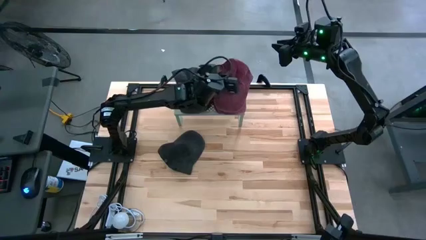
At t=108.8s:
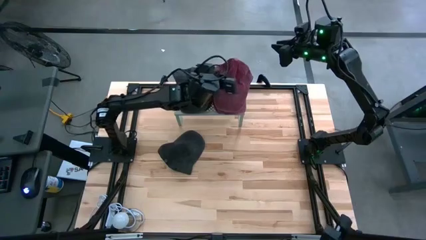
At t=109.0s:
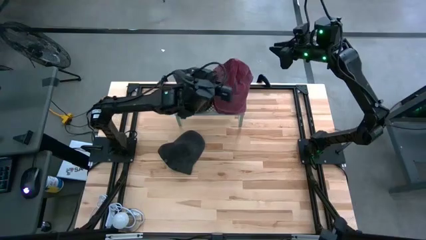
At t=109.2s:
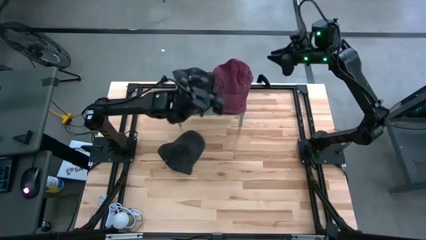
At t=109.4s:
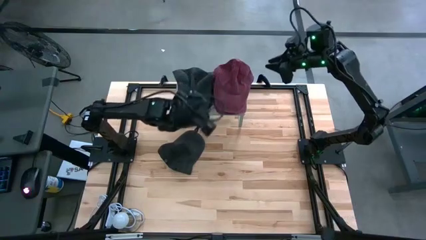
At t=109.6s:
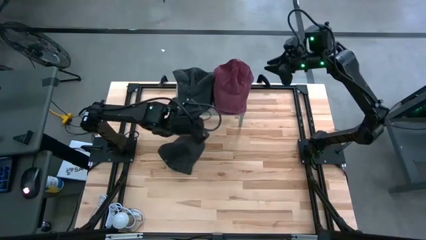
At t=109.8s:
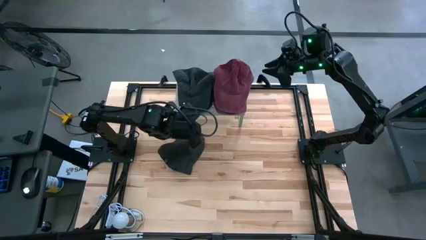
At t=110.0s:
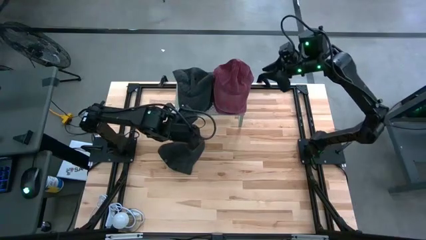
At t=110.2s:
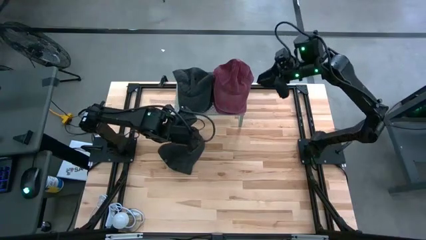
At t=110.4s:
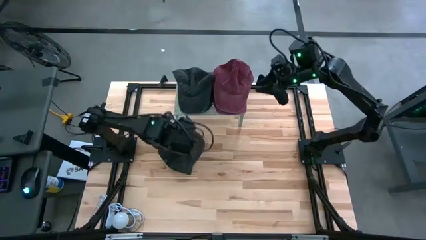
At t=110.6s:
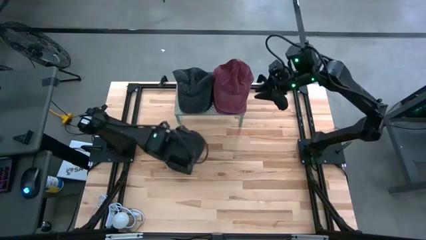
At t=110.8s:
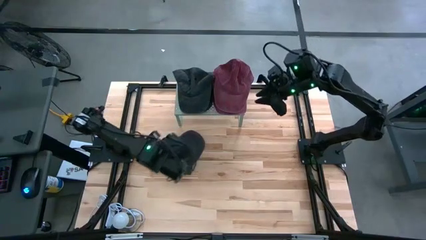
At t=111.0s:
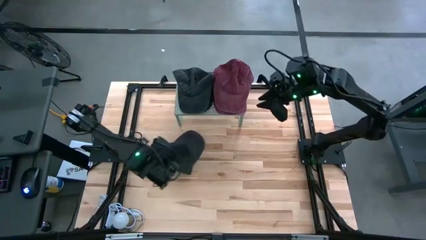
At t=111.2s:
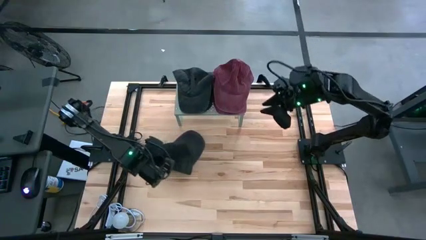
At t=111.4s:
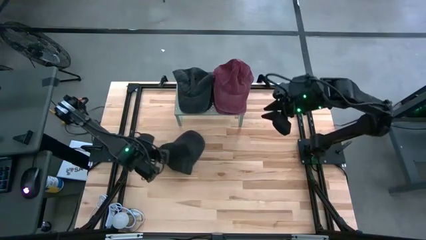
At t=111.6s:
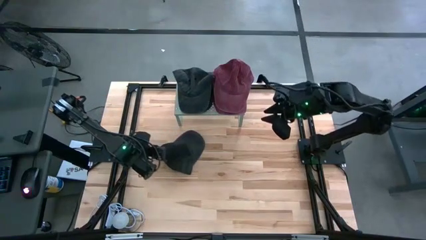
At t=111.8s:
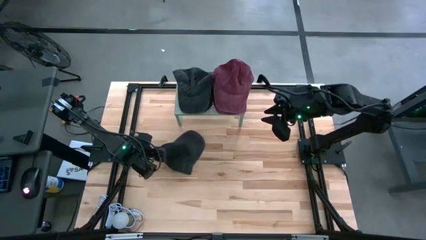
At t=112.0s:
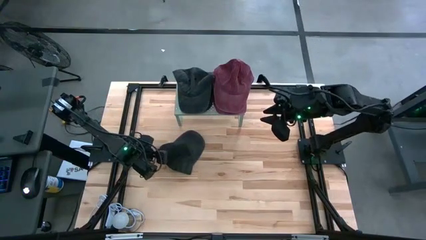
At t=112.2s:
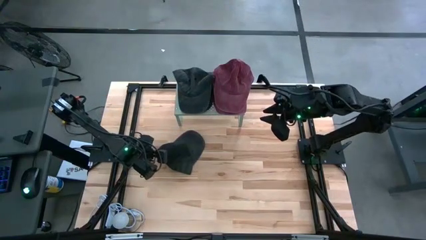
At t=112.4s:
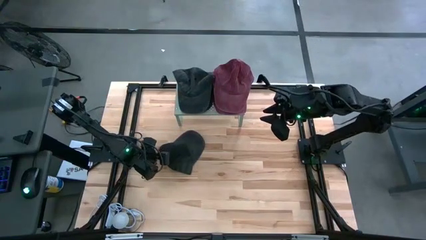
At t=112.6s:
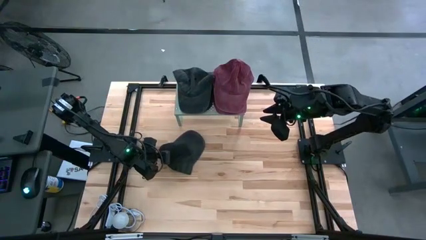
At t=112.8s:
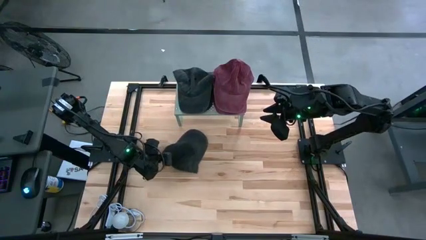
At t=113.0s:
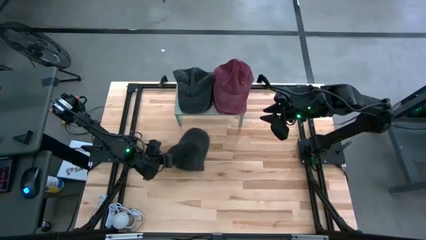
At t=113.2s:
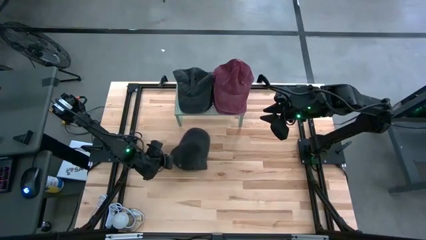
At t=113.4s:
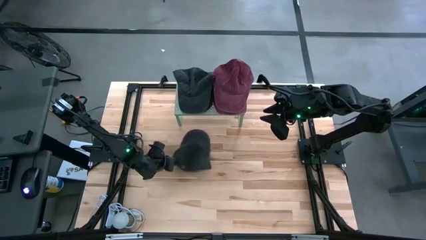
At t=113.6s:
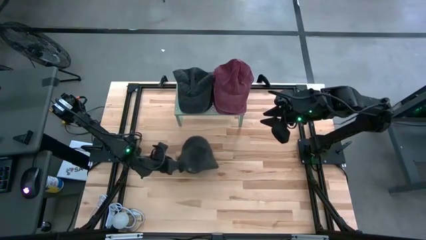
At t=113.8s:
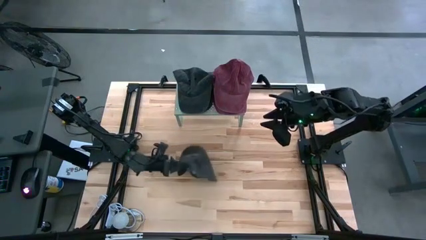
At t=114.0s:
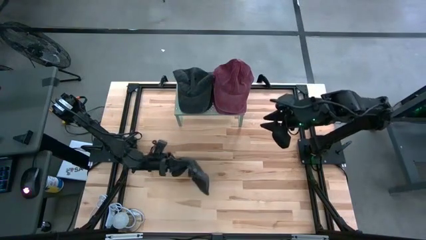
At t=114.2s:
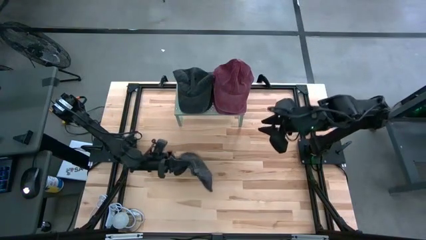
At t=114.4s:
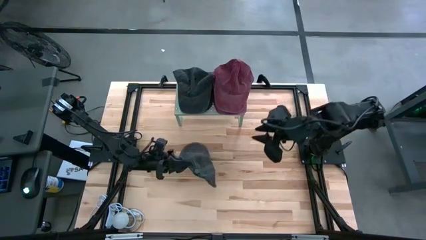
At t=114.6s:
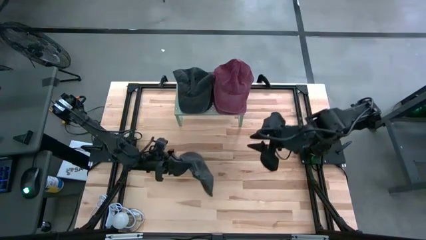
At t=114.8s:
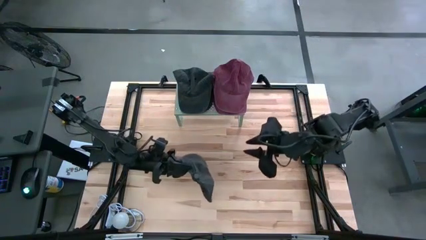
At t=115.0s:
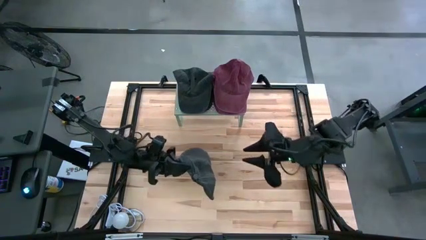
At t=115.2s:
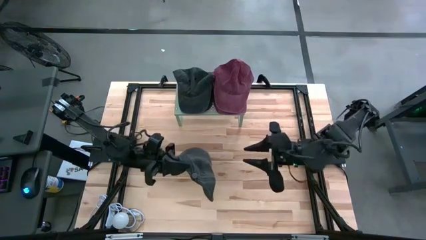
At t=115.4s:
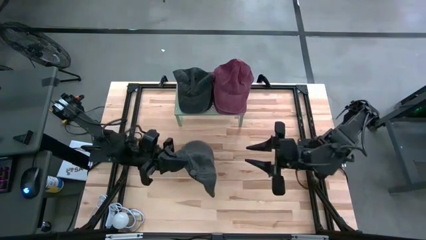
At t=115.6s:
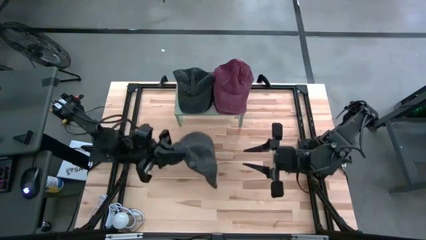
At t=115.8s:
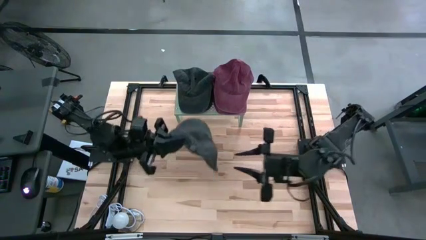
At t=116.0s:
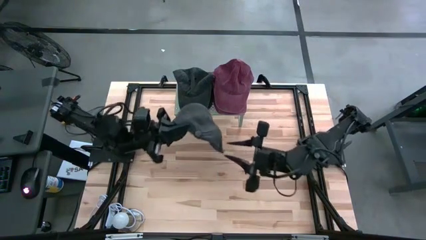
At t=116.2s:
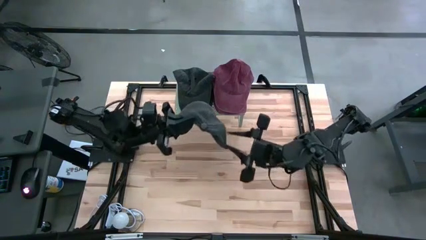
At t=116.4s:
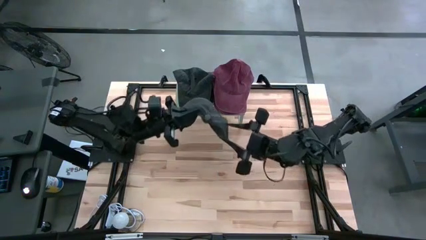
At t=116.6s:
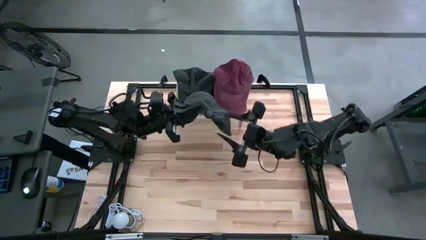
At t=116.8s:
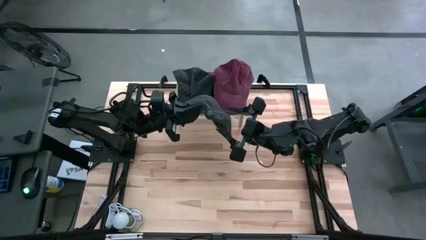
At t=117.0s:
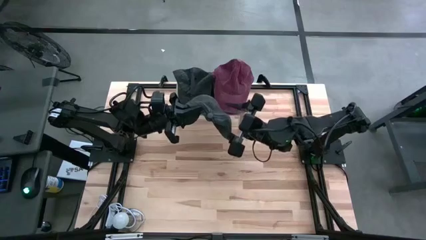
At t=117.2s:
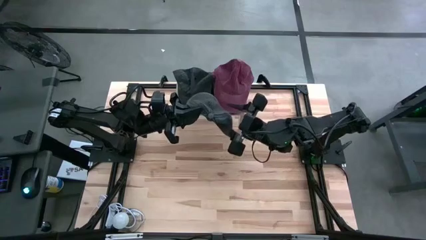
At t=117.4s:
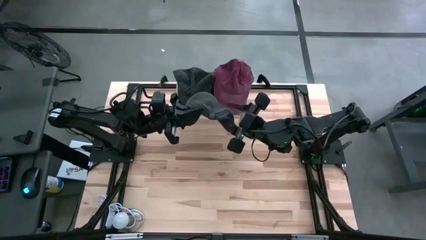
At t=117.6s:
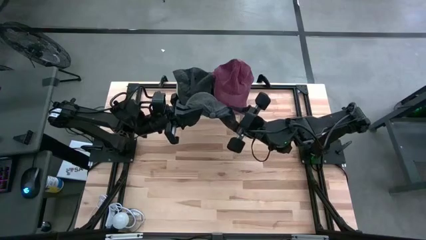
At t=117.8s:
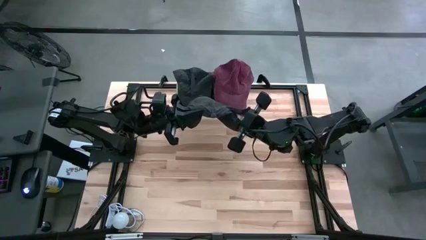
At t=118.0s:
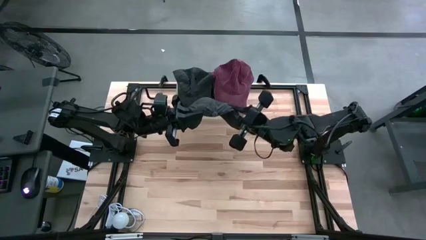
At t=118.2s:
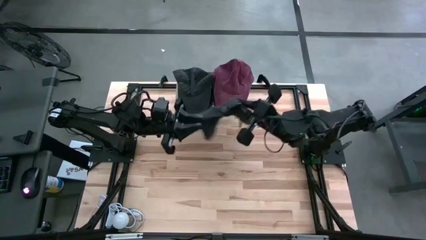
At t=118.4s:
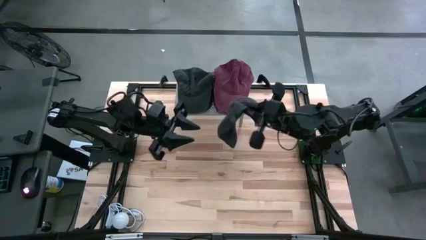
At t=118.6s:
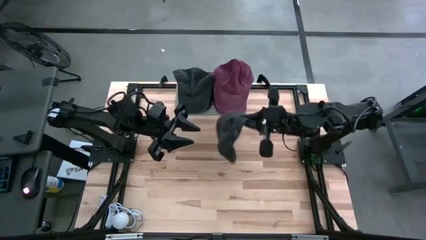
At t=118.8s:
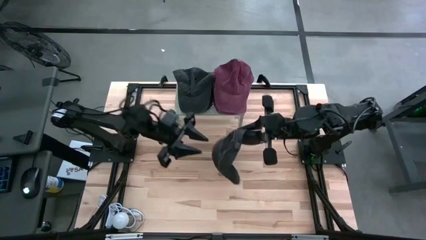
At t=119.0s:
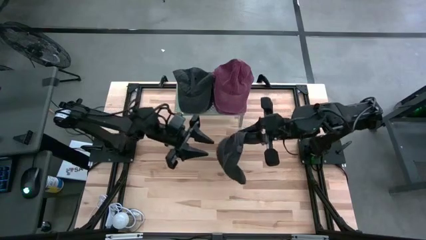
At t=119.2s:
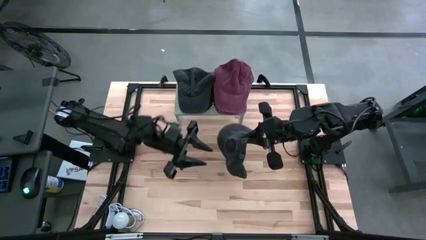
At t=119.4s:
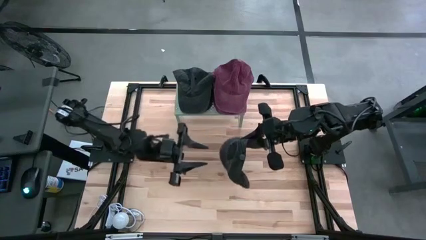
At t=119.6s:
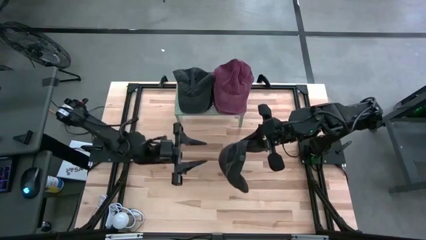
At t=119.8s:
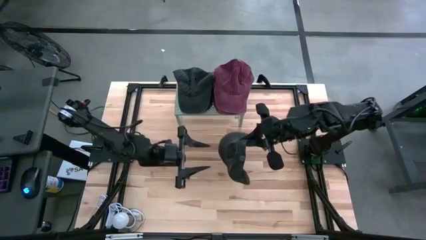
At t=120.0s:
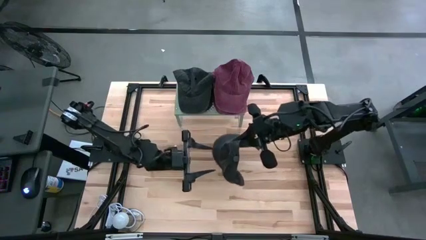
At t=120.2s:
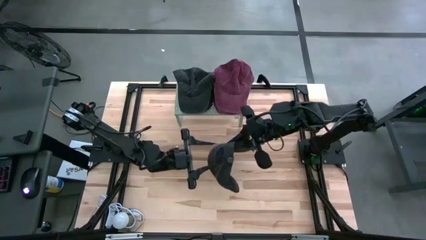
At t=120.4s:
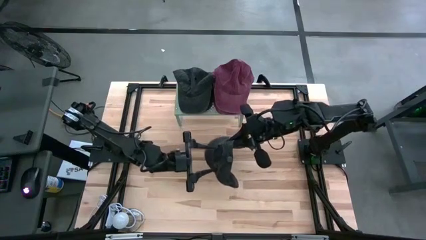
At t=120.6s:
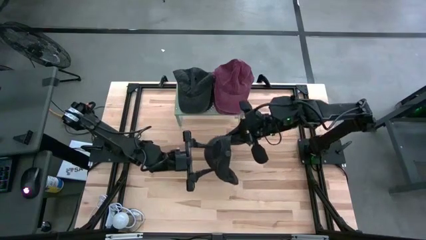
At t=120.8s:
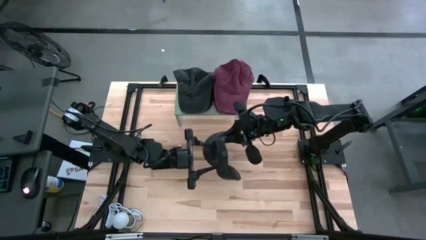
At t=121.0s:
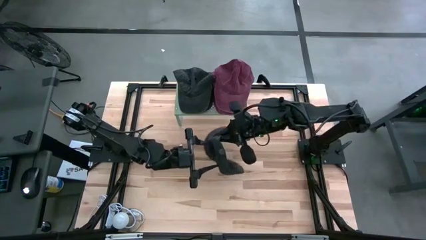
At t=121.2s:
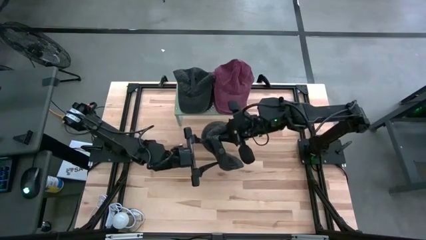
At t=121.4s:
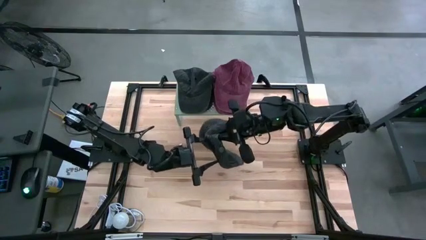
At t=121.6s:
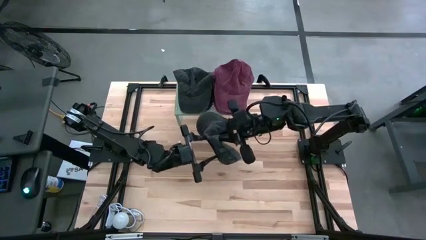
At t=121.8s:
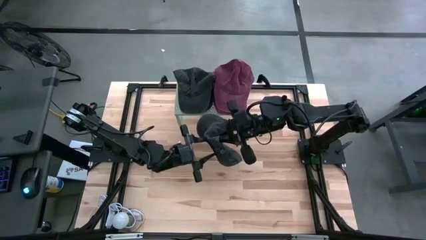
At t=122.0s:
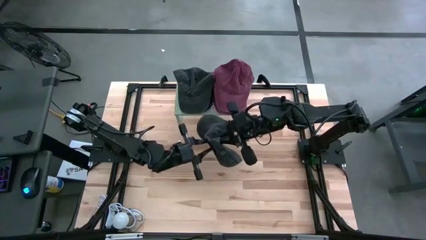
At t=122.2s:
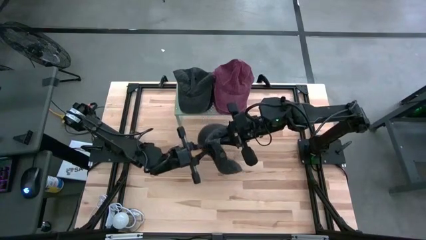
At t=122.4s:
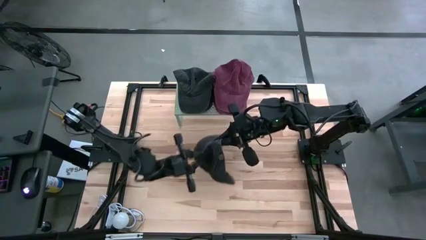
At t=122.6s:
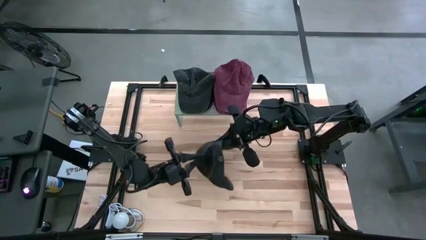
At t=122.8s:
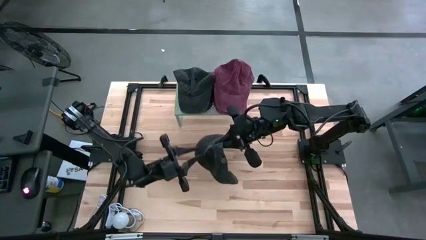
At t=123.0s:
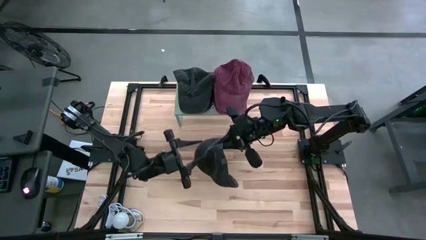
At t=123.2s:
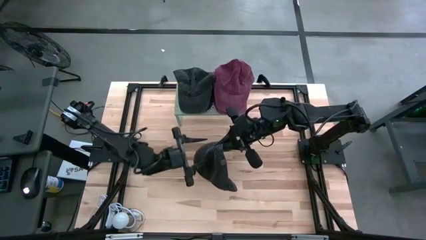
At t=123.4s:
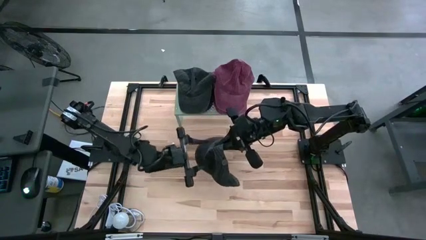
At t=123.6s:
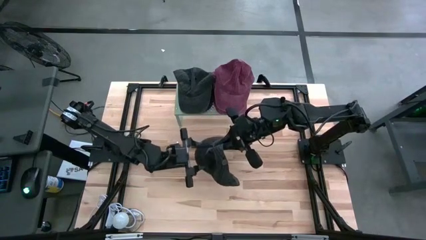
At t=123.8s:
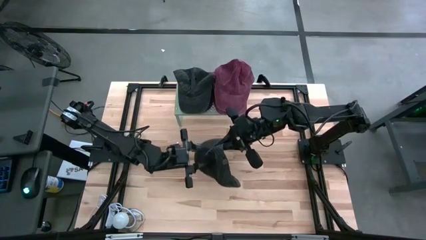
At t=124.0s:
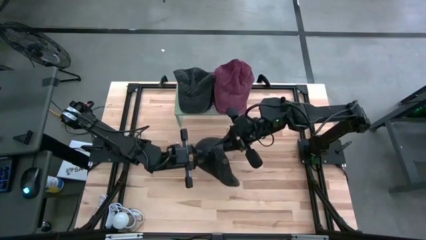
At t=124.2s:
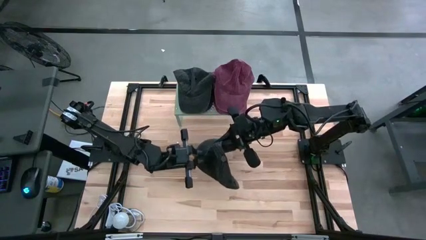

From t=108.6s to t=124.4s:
Task: Pick & Place hat
Stack the black cap on the red caps on the shelf

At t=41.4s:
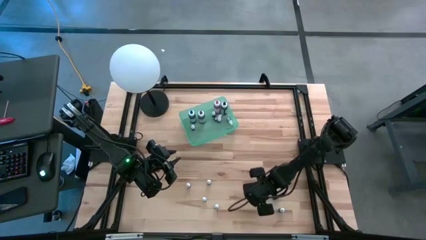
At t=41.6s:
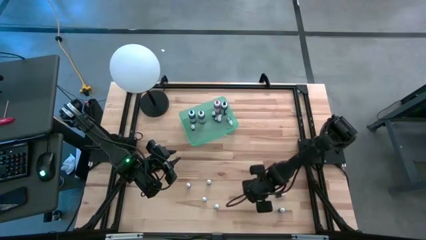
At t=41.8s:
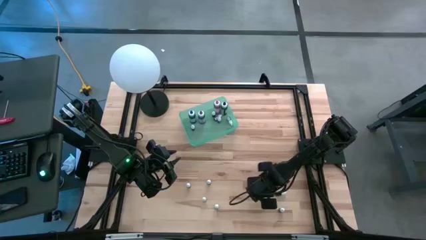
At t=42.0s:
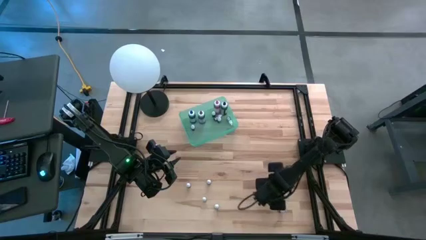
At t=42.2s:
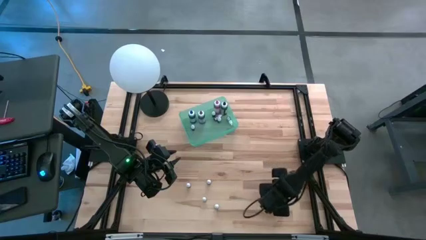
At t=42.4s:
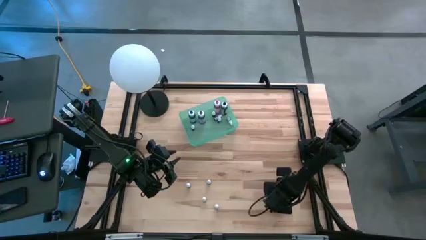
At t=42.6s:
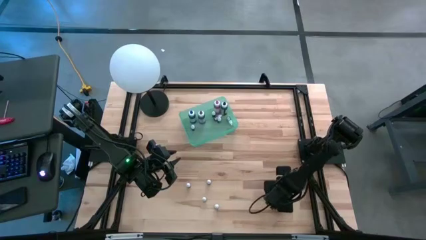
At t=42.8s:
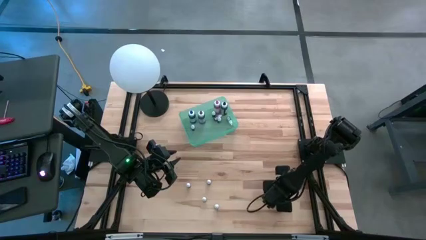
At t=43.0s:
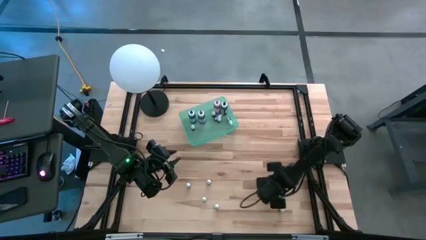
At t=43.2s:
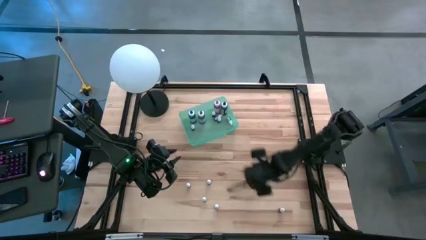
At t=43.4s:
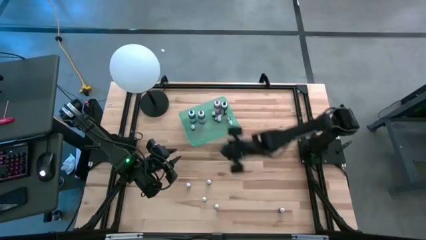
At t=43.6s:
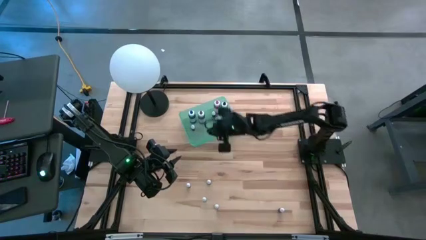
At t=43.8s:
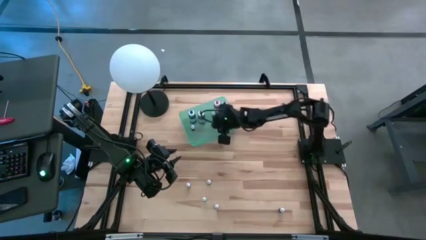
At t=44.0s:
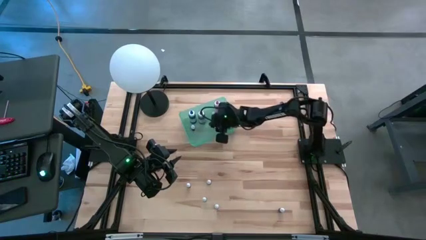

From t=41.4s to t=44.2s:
Task: Pick & Place food coloring
Put the small dark brown bottle into the blue bin
